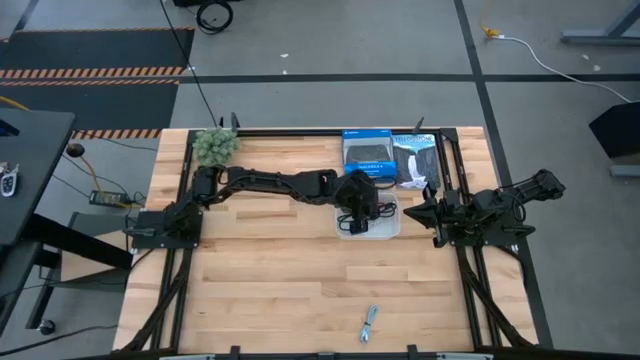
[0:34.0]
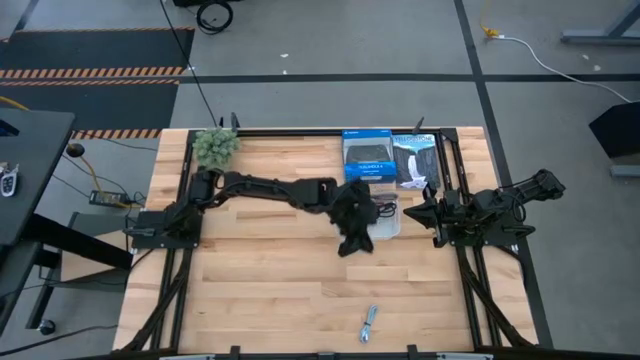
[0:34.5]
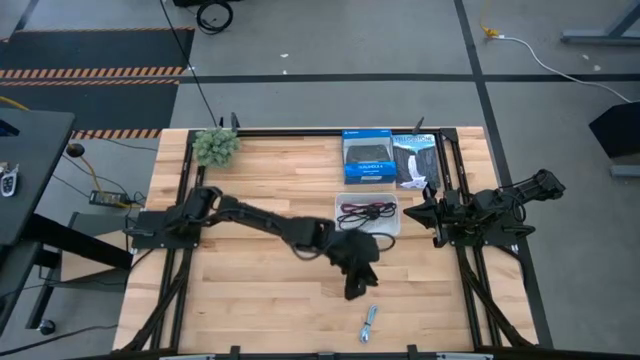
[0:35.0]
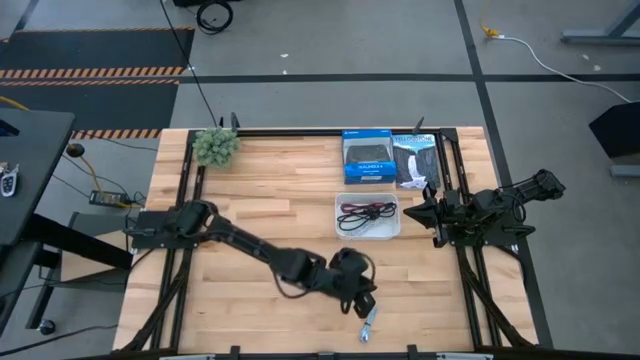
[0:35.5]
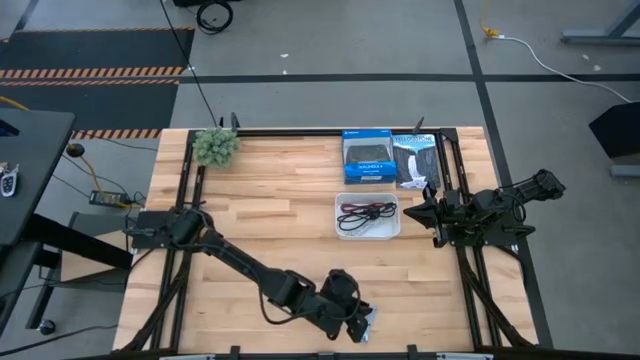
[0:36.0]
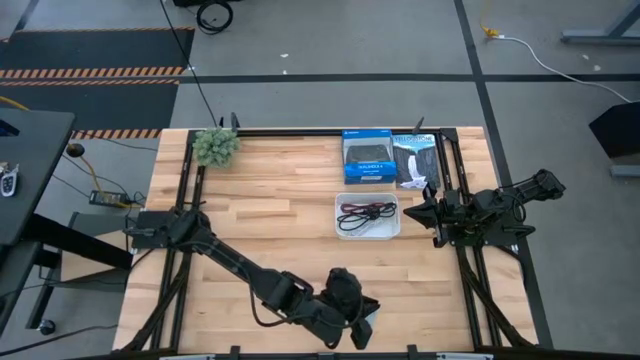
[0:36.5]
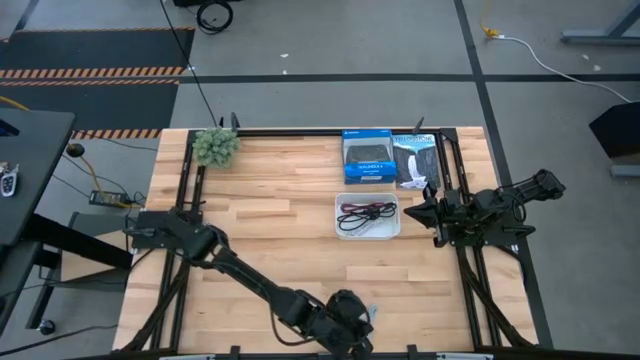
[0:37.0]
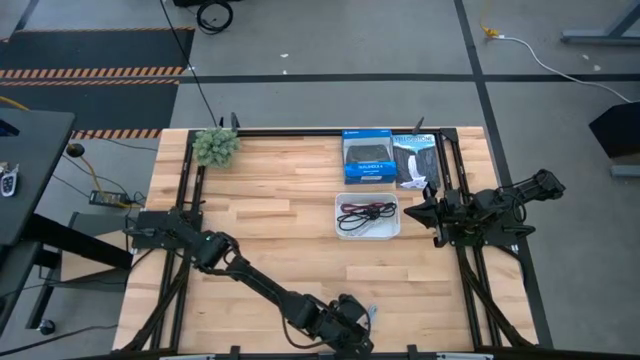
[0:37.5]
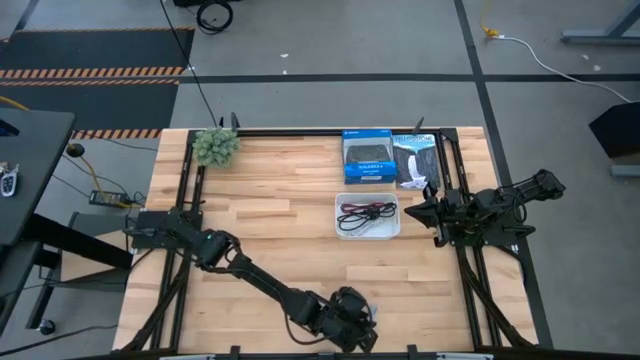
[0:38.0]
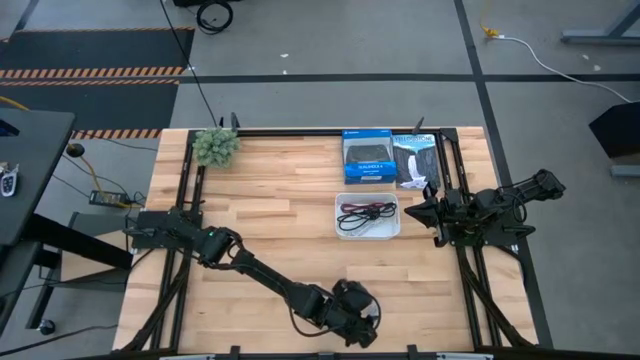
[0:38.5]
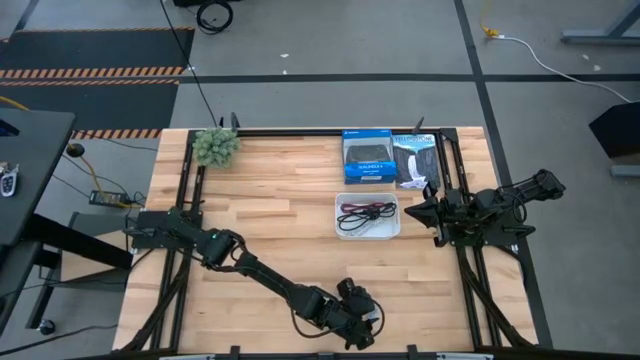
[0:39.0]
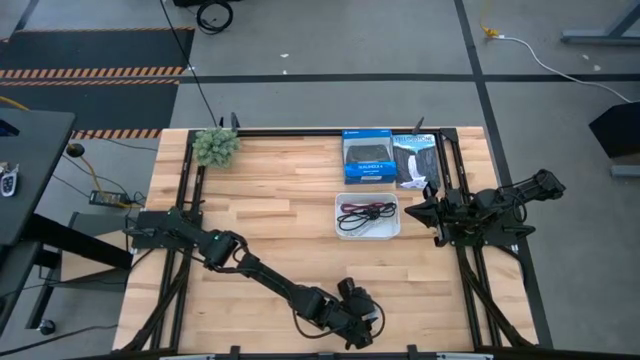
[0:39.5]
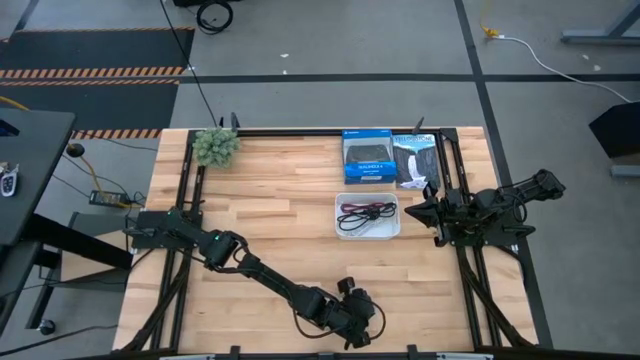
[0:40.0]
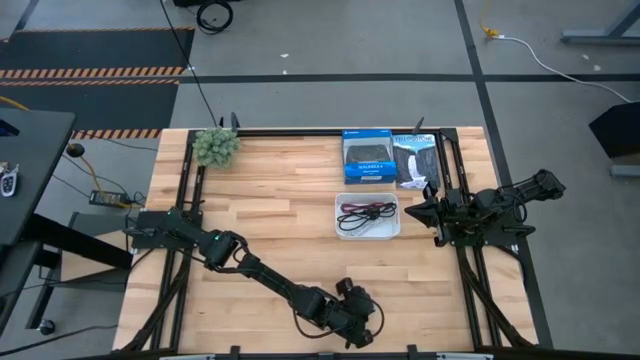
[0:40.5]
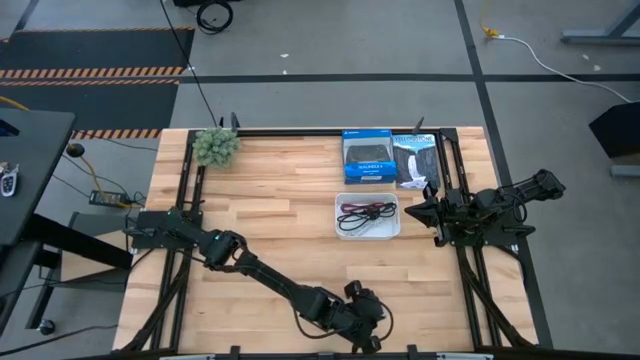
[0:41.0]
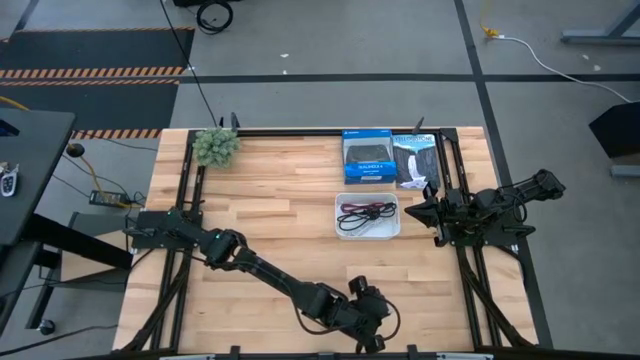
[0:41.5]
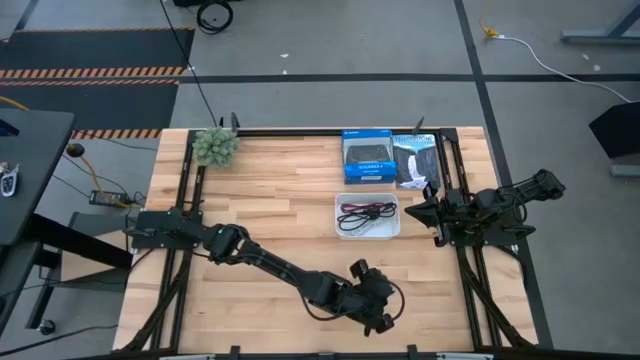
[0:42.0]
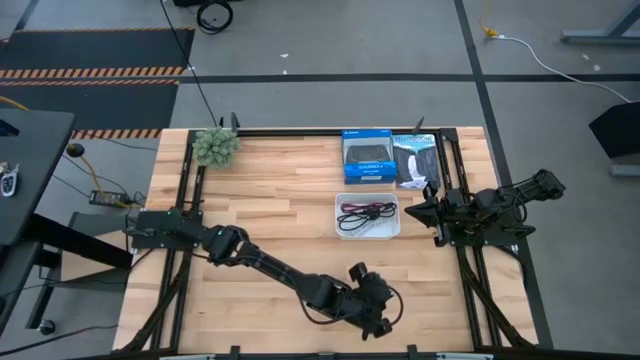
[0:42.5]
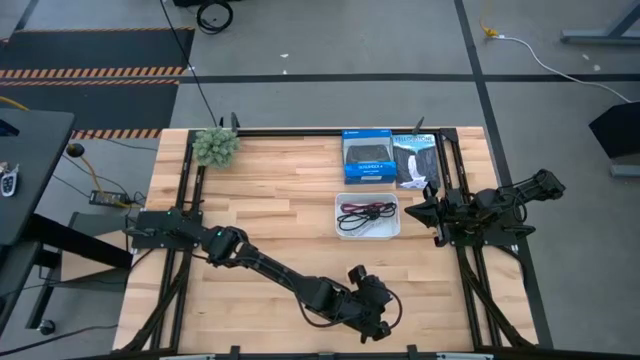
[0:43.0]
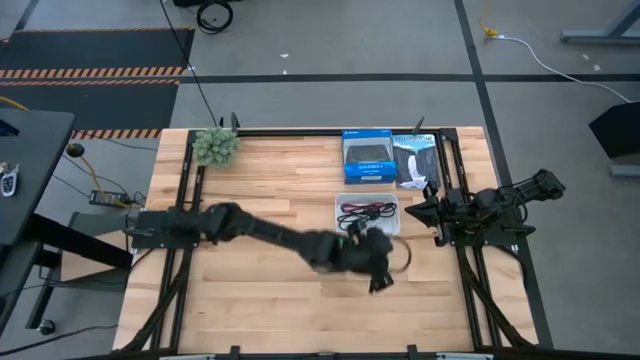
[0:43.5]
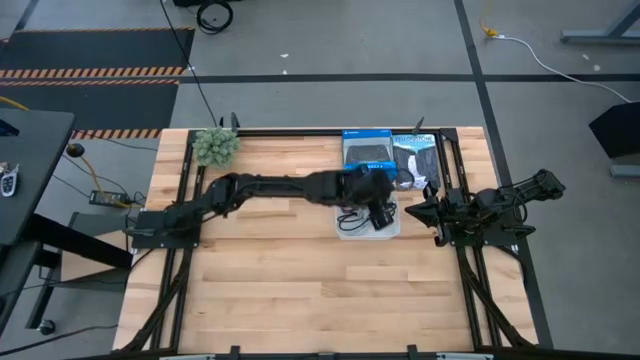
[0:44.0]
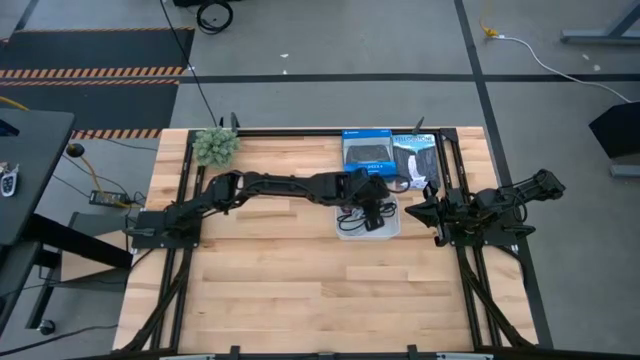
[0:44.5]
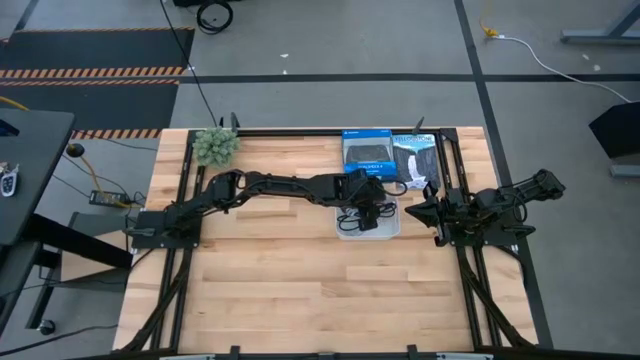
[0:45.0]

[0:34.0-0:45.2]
Task: Pick and place USB-C Cables
Put the blue charger cable into the white bin

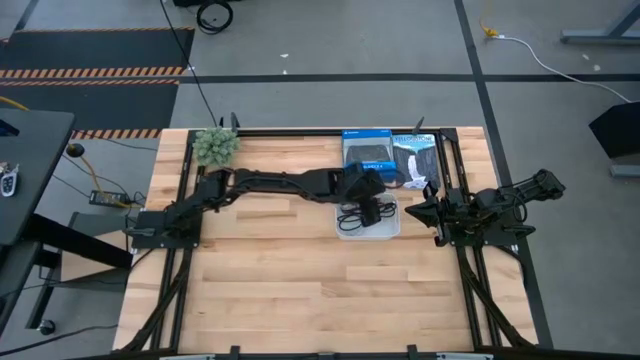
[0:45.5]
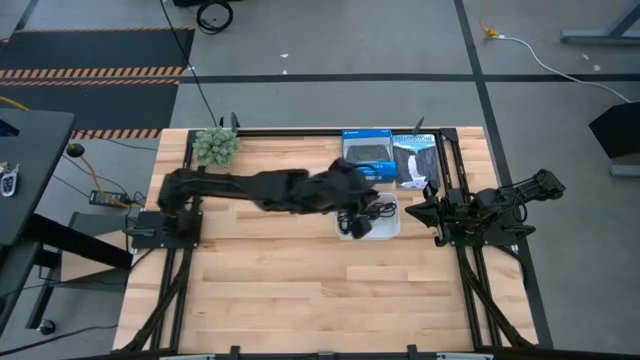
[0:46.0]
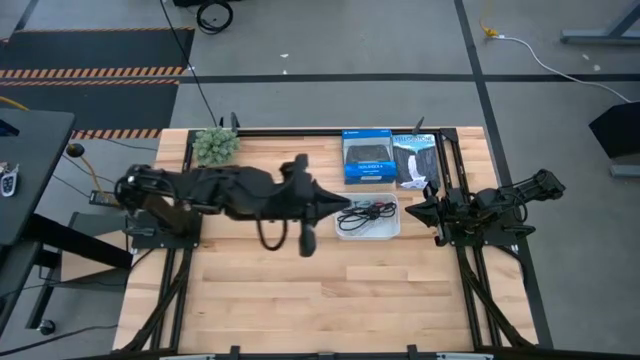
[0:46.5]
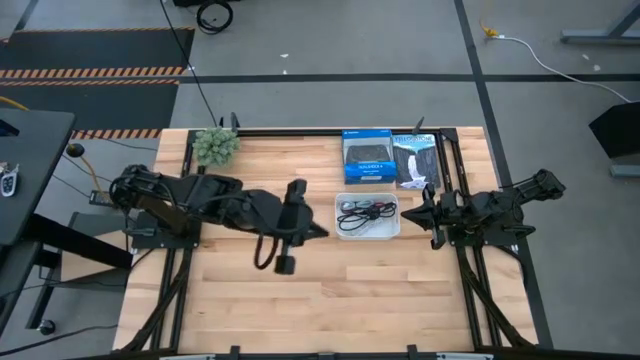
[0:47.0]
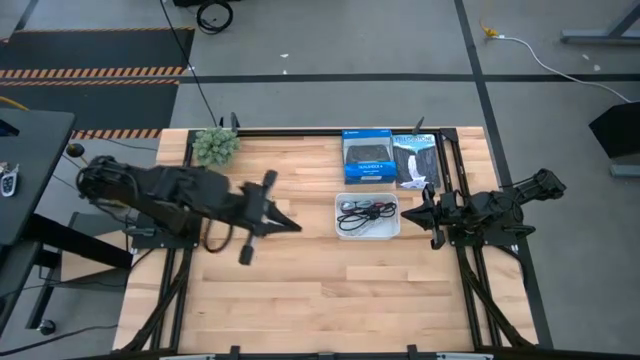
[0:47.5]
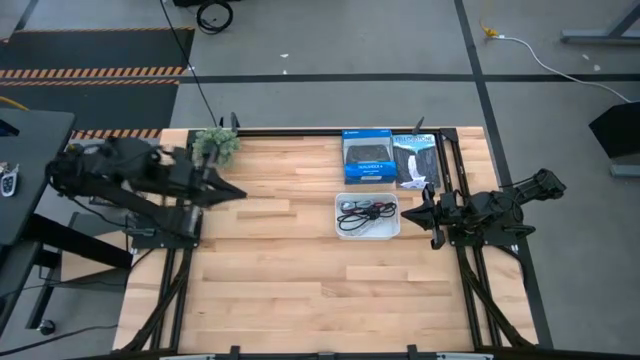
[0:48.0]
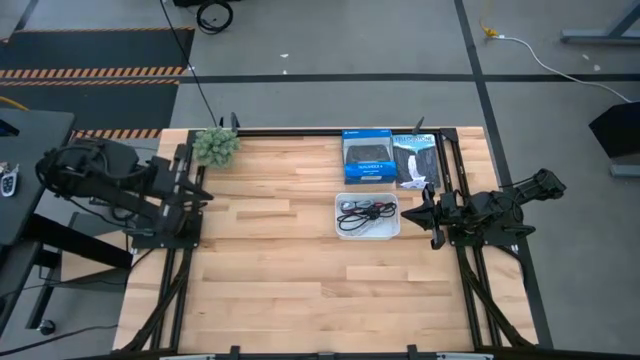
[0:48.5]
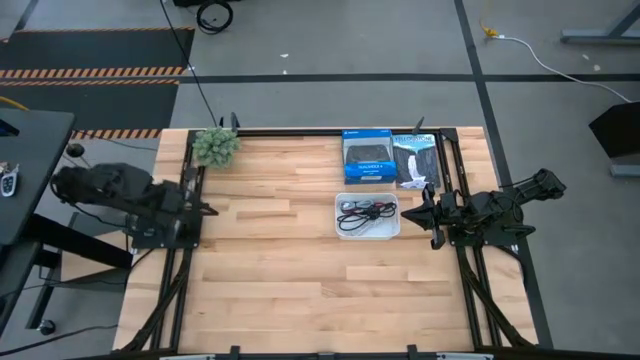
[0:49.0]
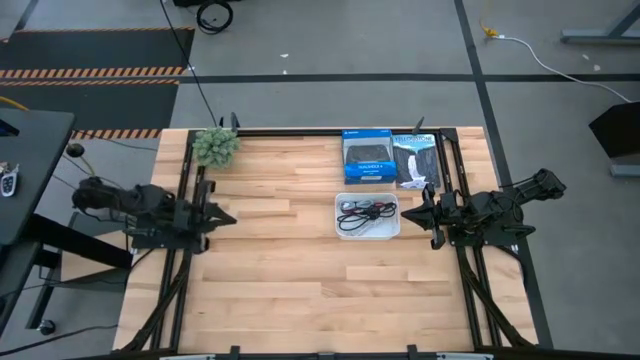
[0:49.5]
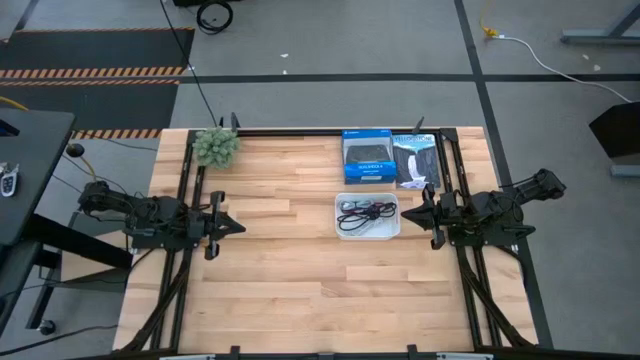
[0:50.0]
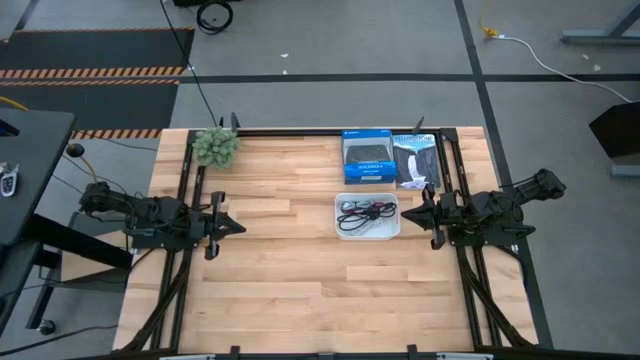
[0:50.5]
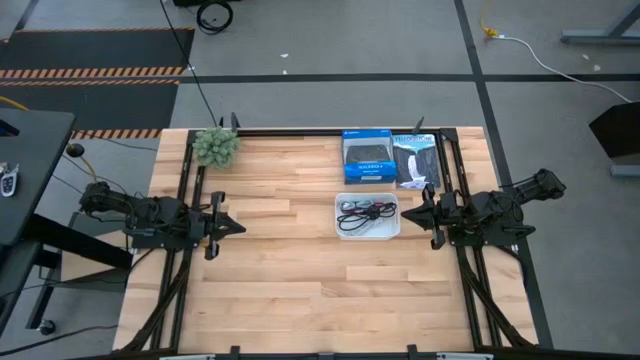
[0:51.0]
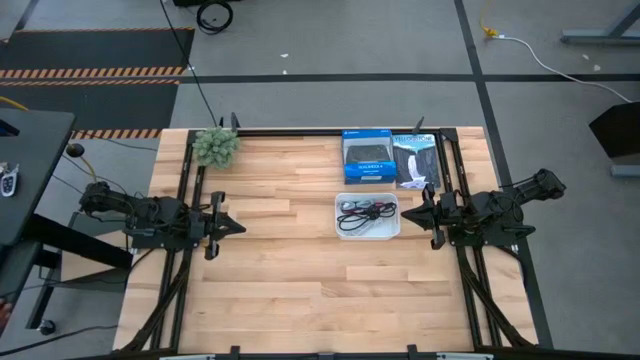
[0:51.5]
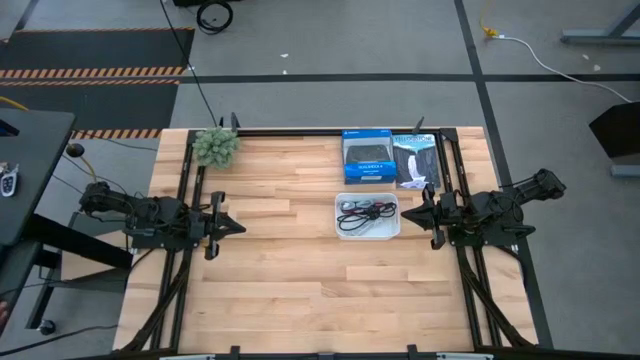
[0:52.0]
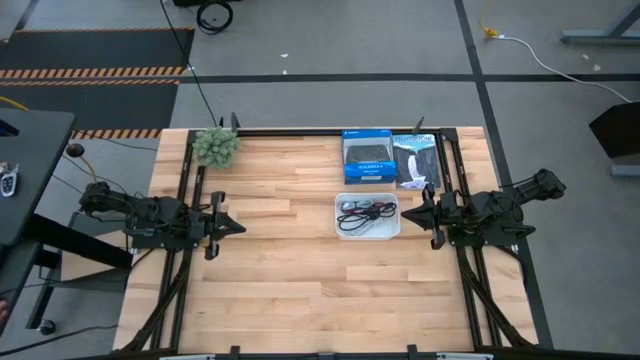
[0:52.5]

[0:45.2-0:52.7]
Return to Home Position

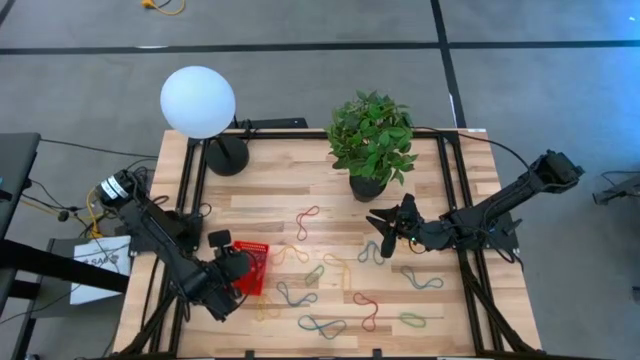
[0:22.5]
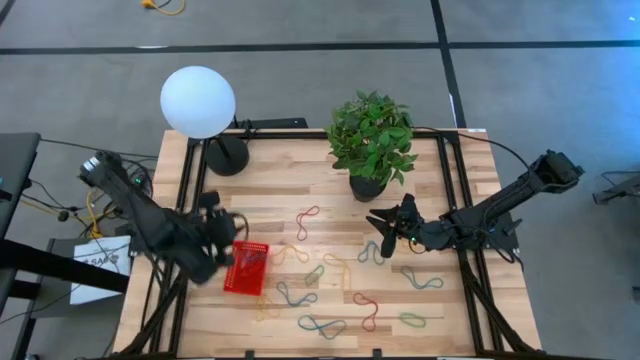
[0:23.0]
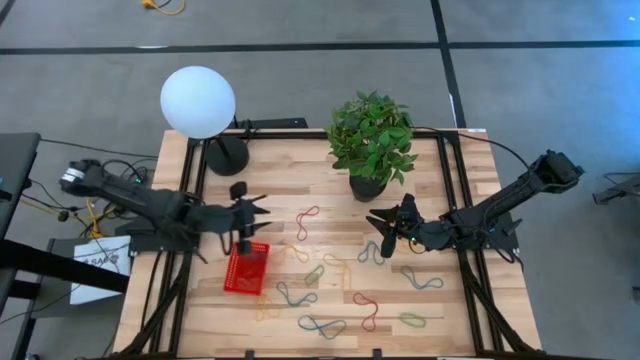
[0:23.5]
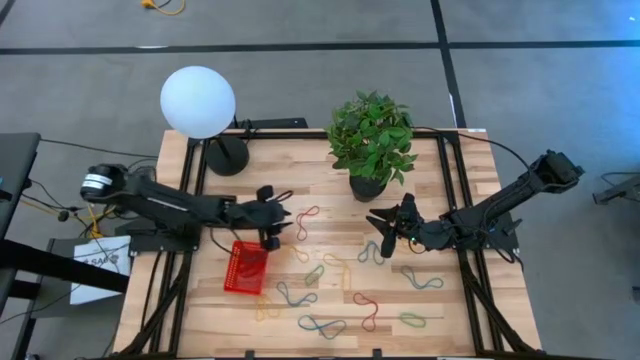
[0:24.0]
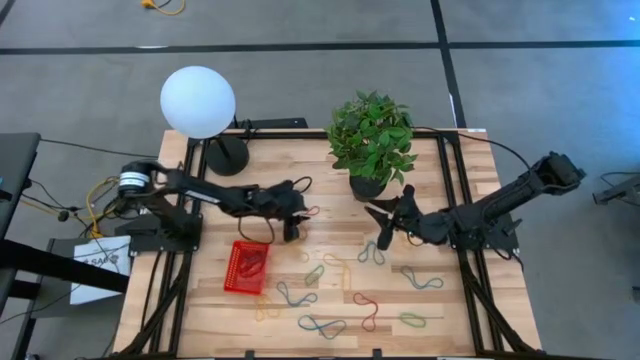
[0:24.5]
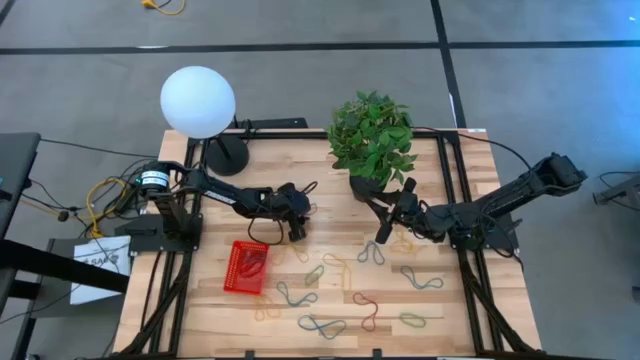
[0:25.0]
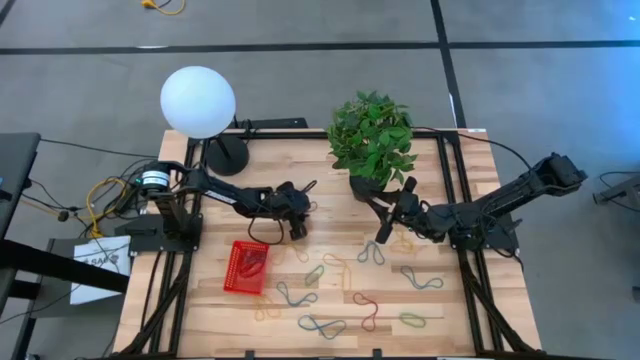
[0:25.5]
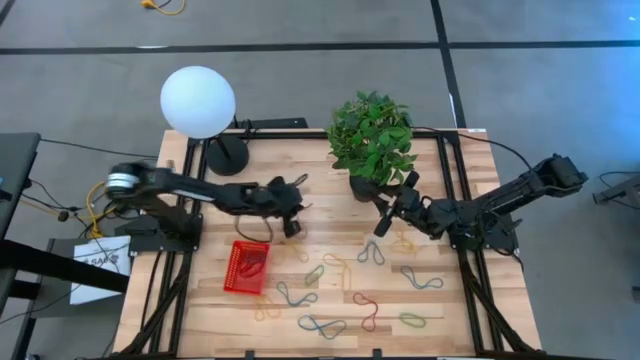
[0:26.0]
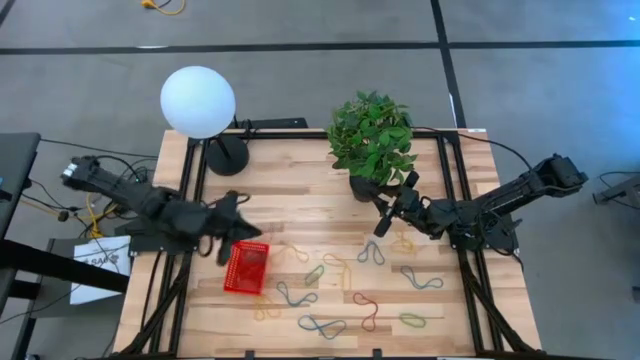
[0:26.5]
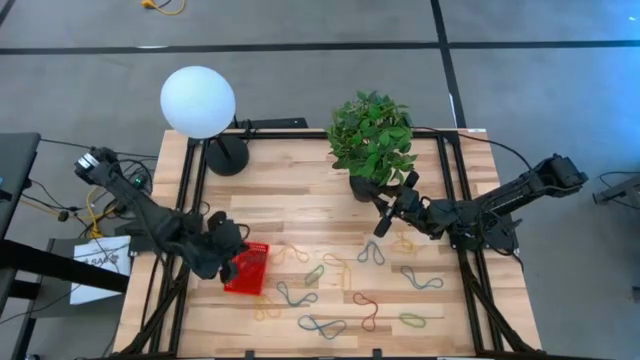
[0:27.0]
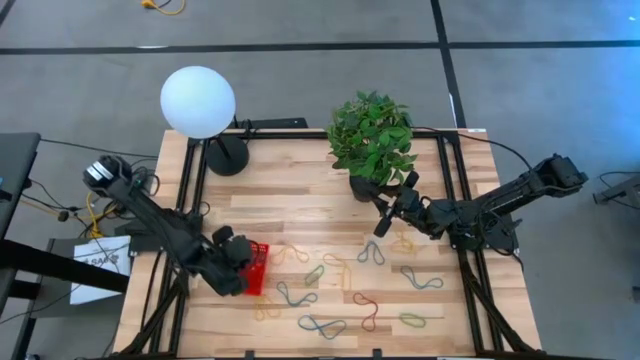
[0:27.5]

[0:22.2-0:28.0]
Task: Pick and place items into bin
Put the red rubber band into the red bin
